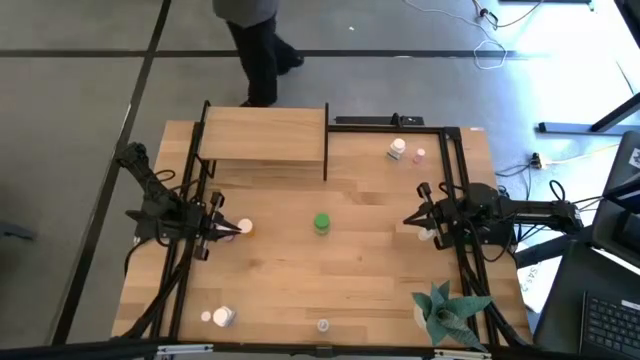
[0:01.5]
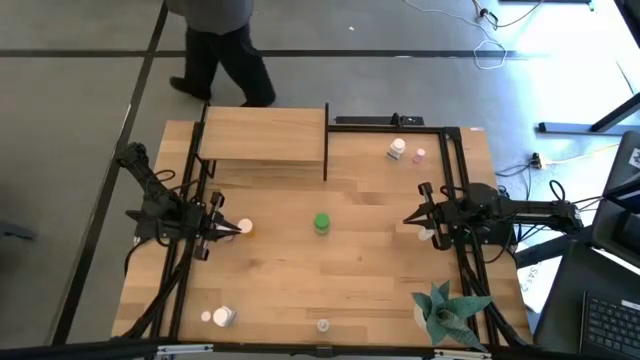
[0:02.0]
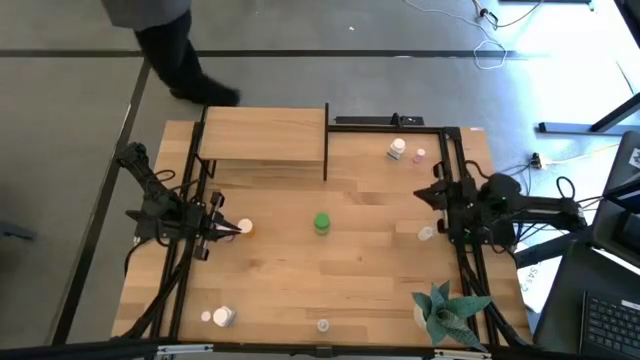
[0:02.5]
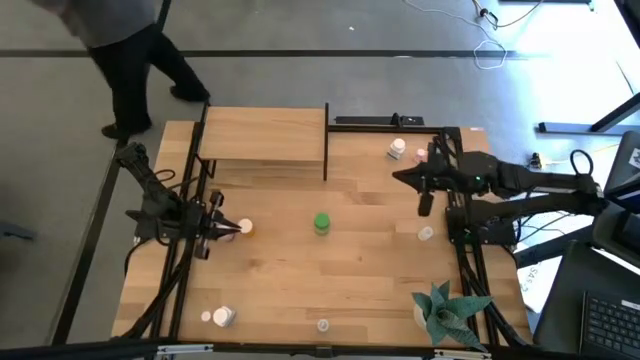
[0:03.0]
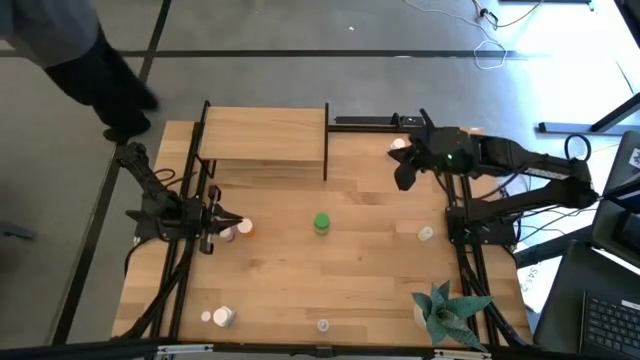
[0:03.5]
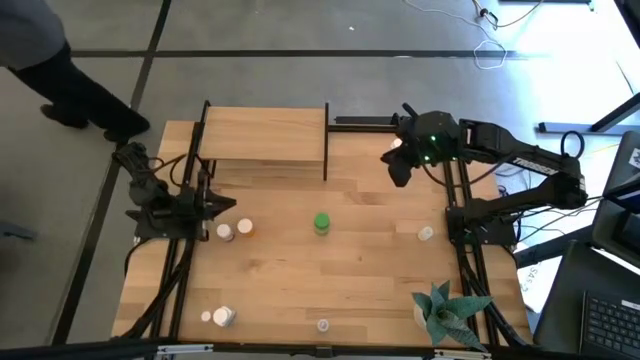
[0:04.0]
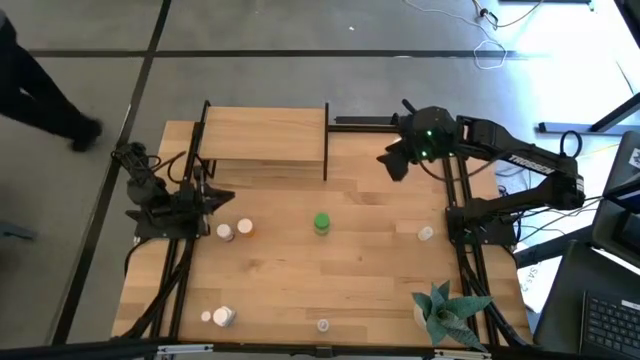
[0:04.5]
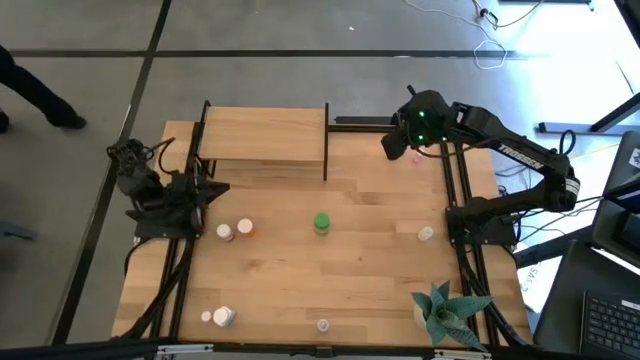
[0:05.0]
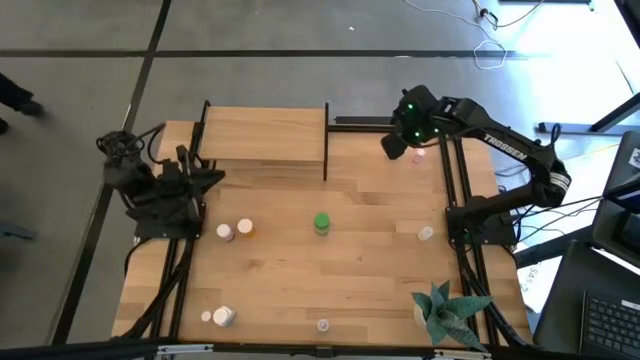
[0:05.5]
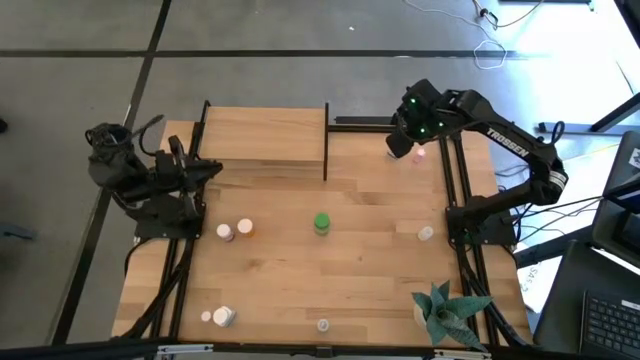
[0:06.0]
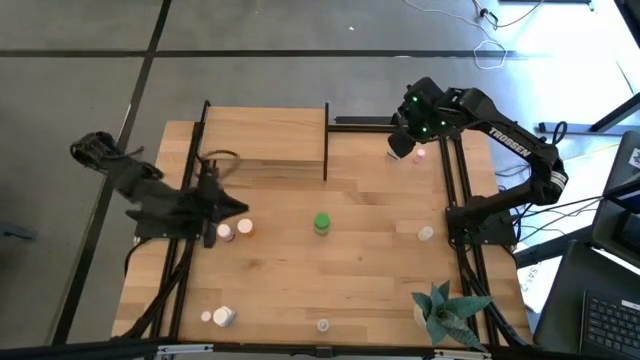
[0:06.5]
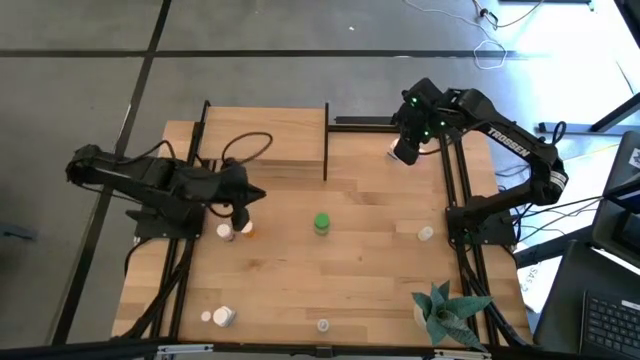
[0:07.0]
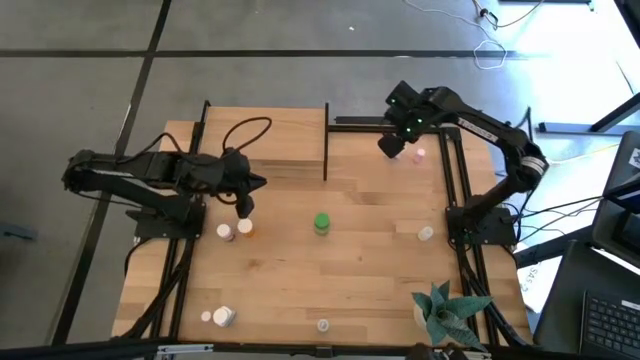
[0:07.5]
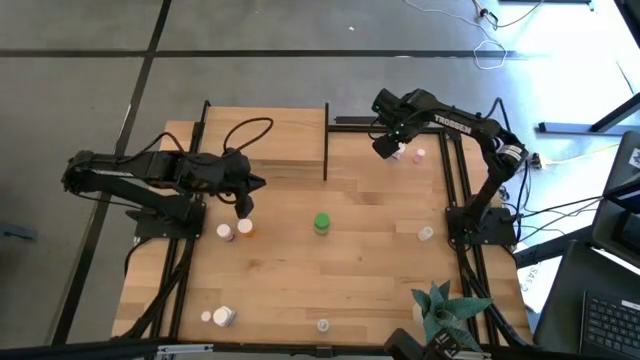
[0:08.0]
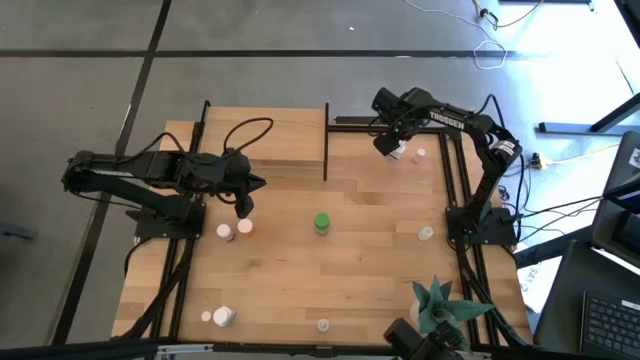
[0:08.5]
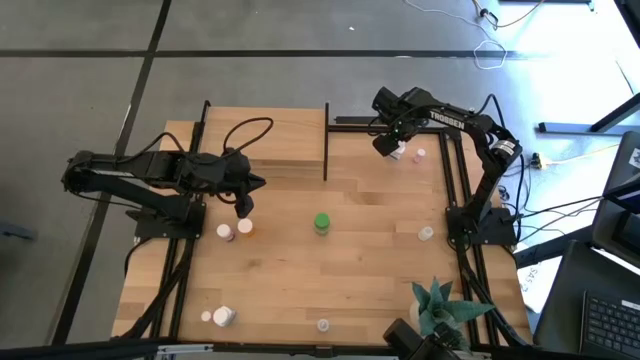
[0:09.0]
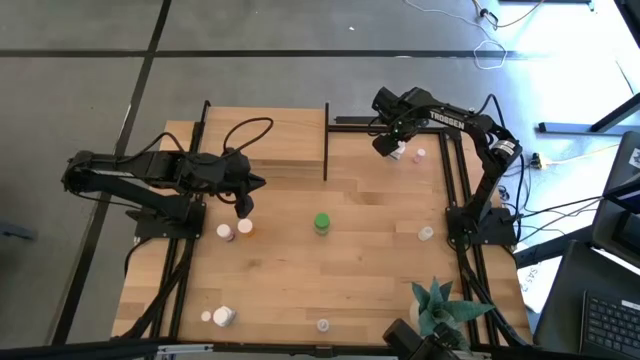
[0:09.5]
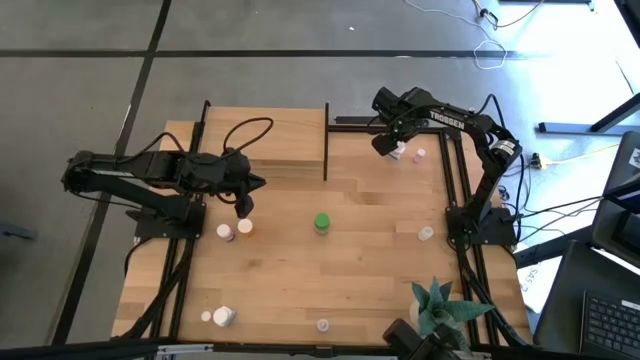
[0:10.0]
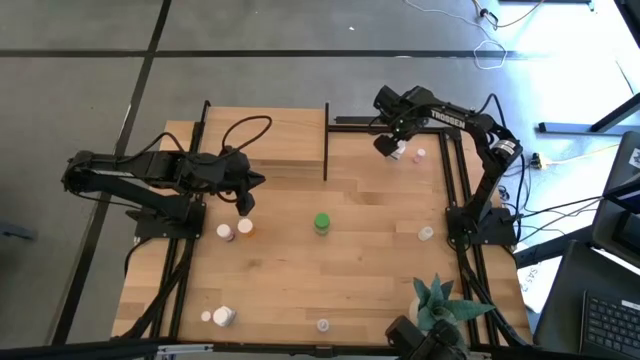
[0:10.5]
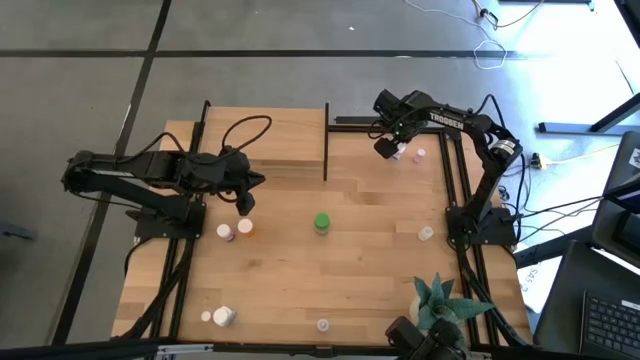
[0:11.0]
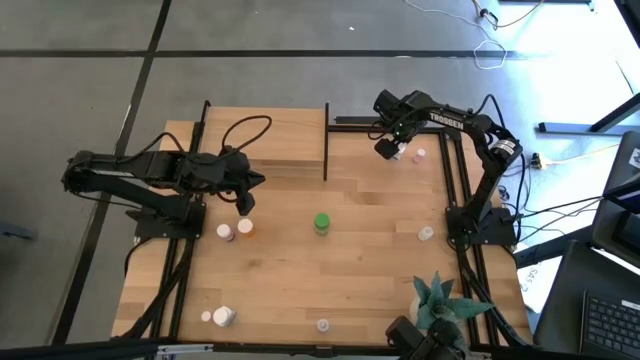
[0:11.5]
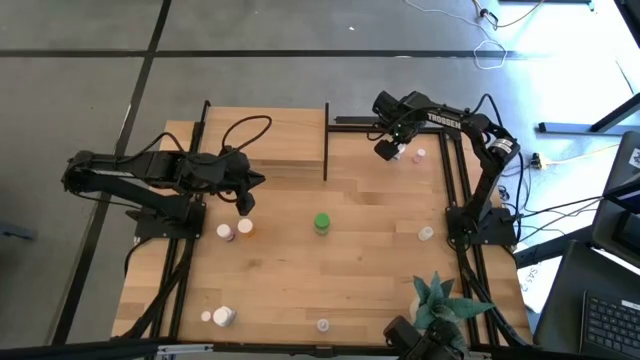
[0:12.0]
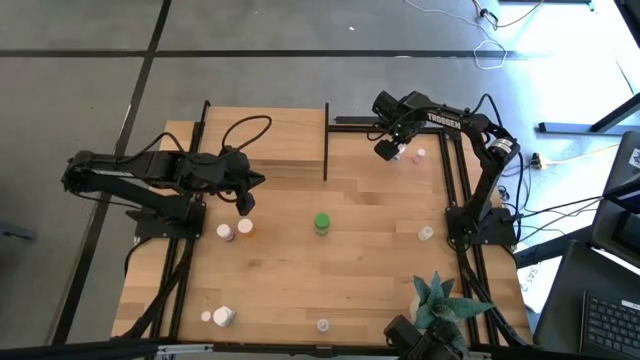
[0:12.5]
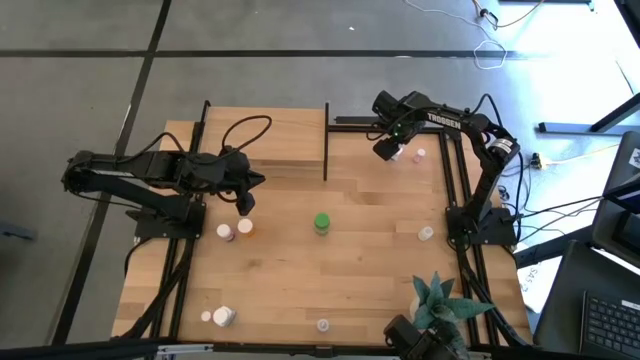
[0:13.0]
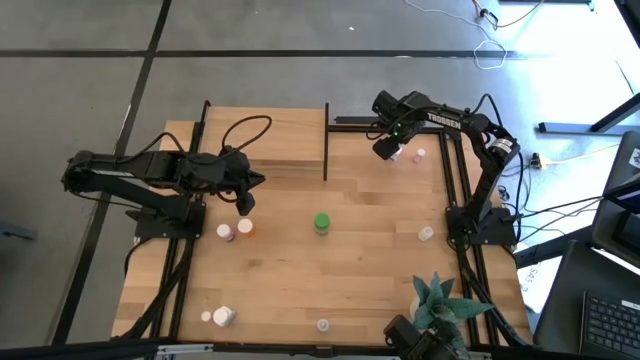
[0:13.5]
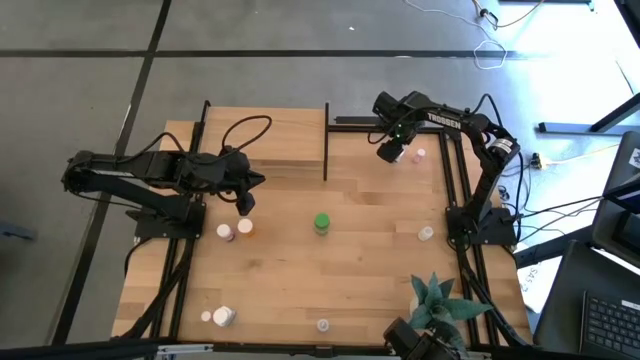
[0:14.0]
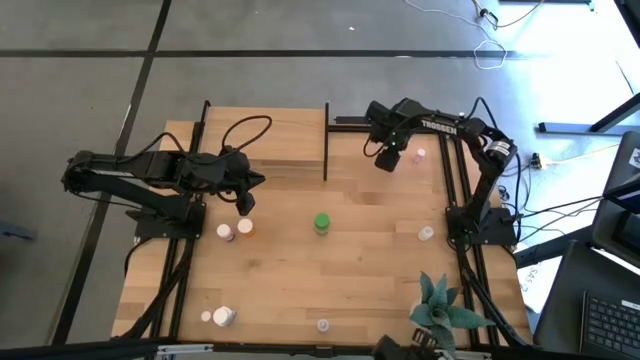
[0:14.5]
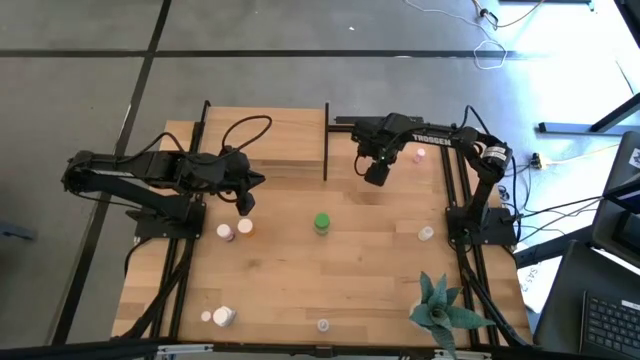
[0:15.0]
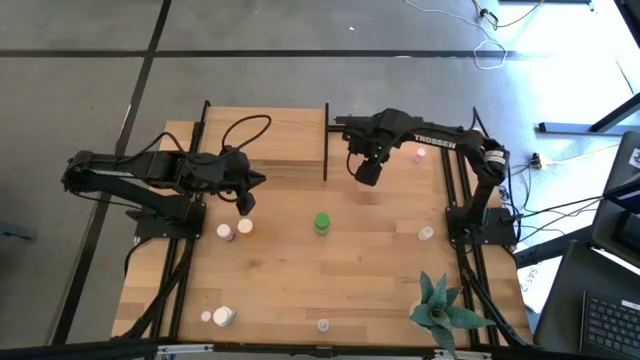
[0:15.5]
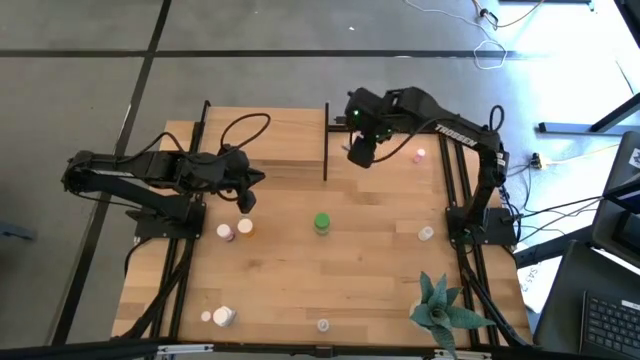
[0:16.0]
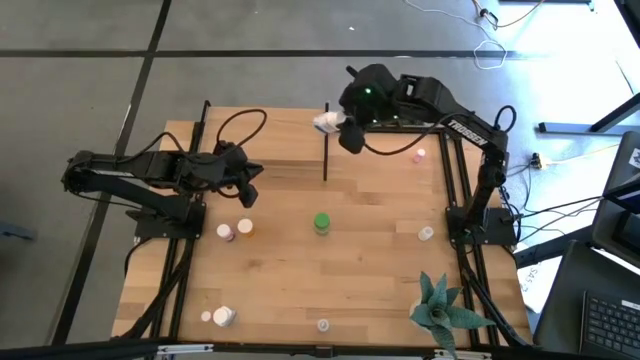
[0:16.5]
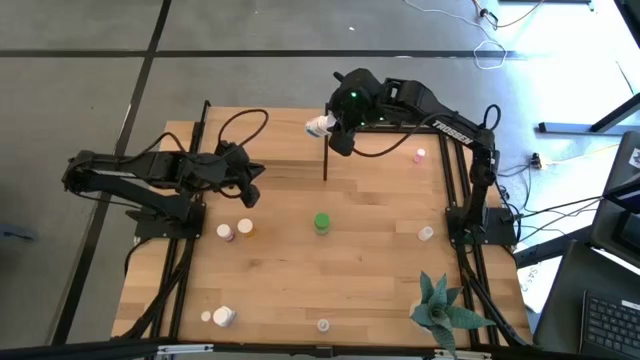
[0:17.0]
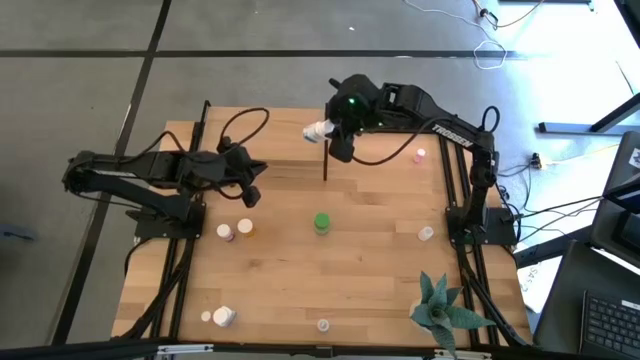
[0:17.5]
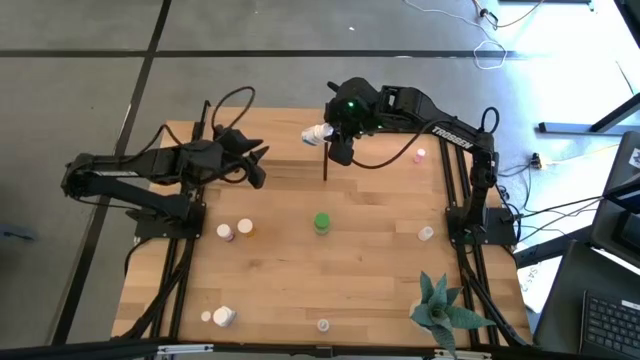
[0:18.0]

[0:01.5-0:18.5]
Task: Pick and place medicine bottles onto shelf by color
Put the top white pill bottle on the shelf

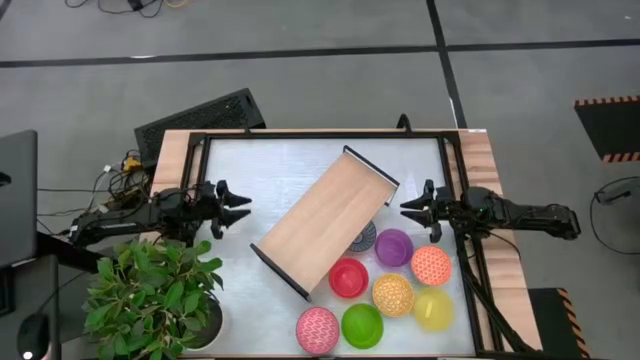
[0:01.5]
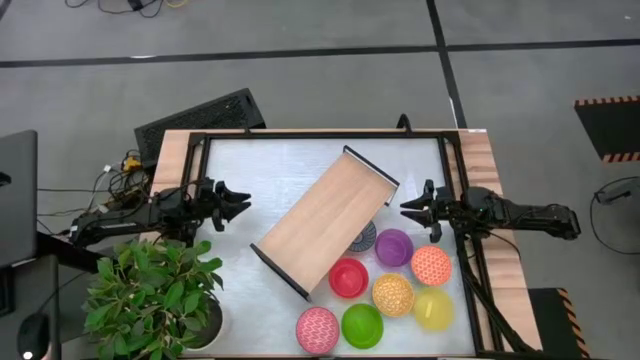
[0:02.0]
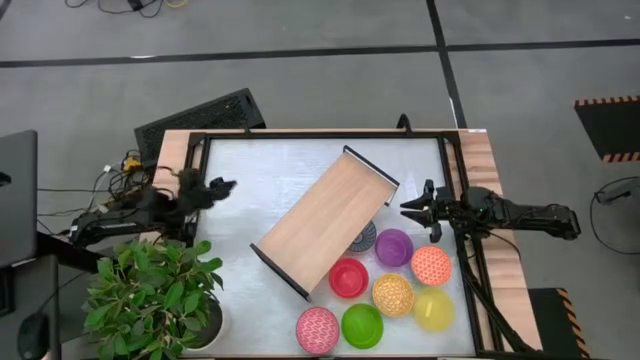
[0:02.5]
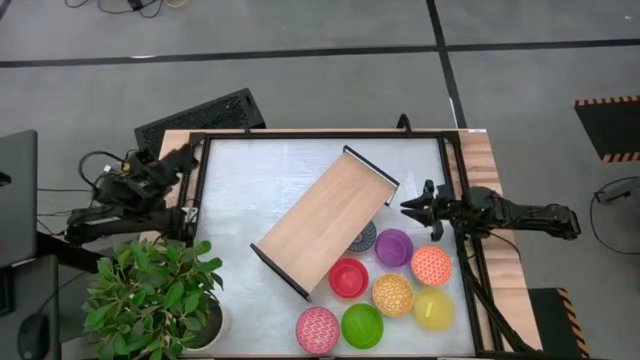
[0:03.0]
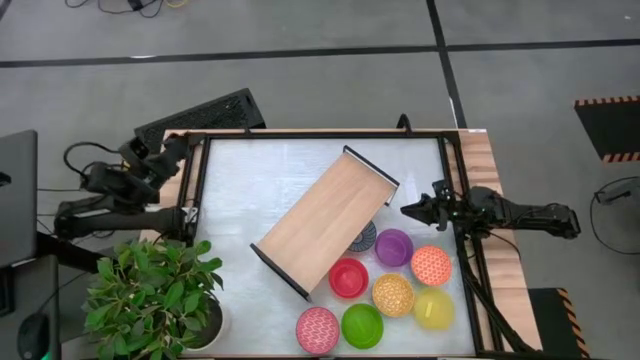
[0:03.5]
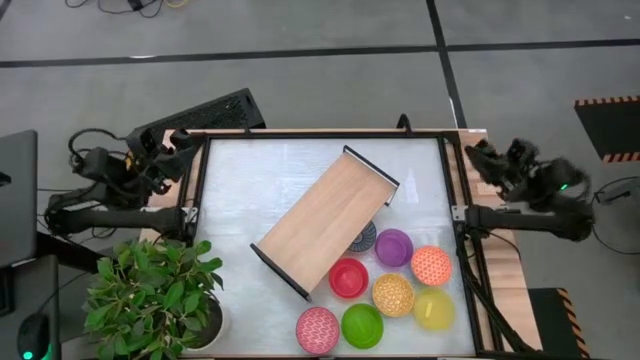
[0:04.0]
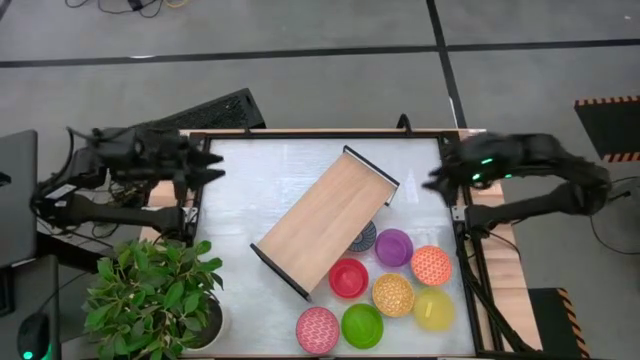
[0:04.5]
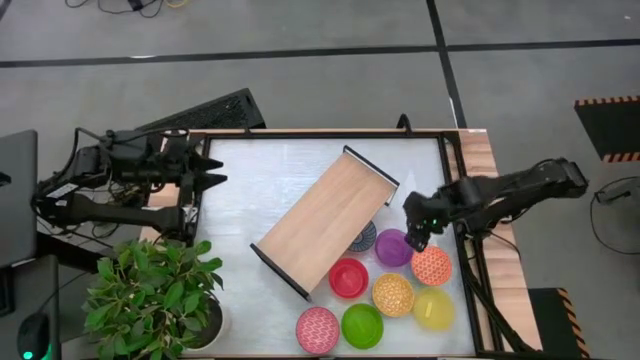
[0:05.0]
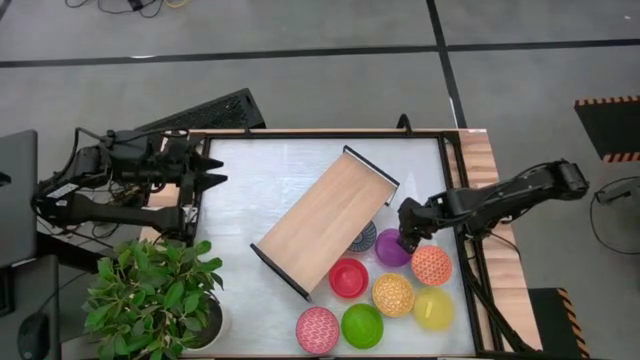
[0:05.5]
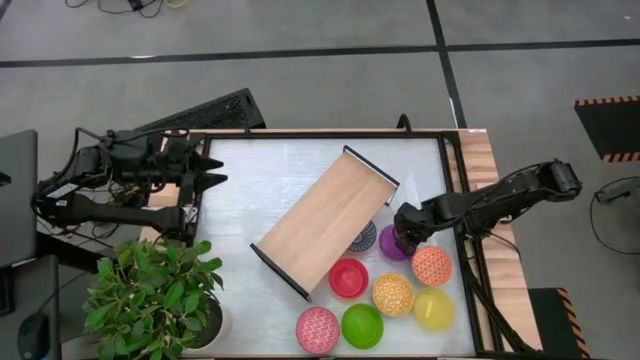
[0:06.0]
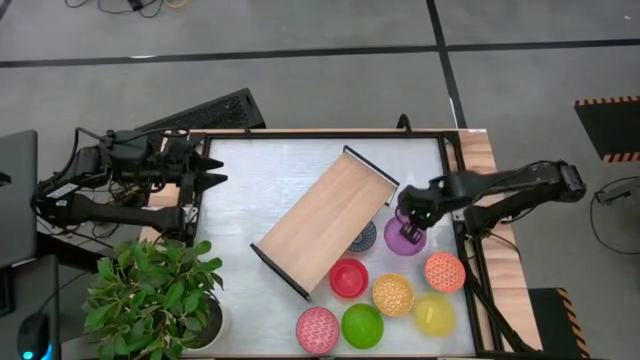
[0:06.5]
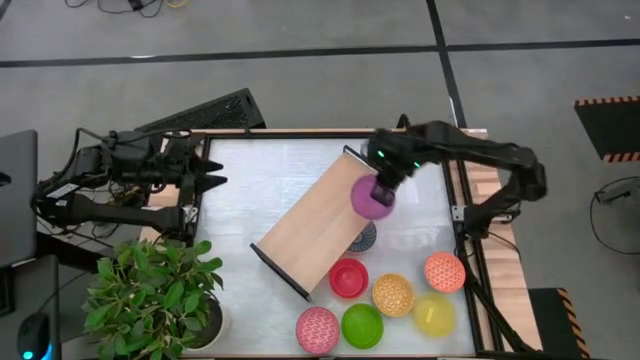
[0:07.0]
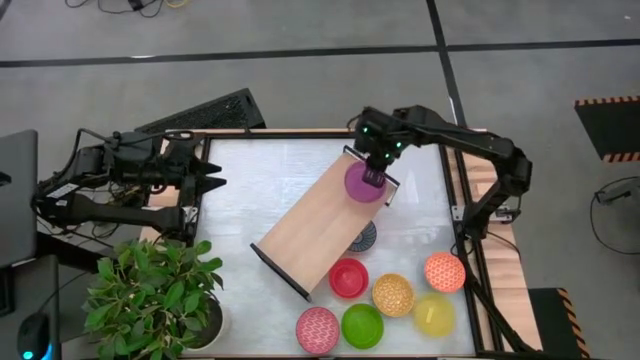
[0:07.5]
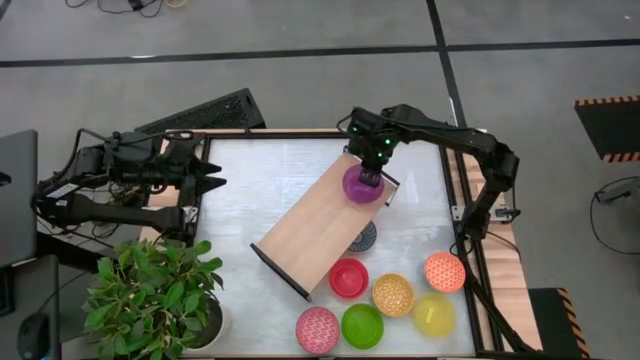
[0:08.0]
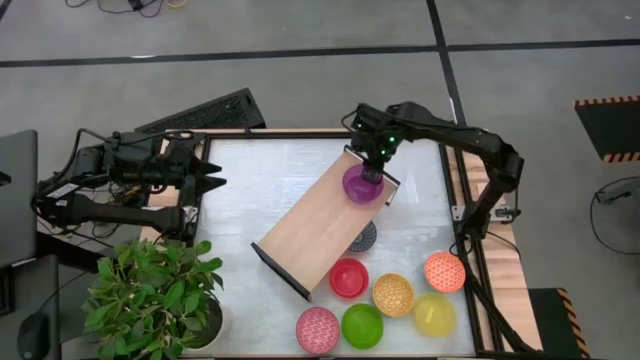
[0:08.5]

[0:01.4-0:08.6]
Task: Place and stack bowls onto a shelf
Put the purple bowl on the shelf
